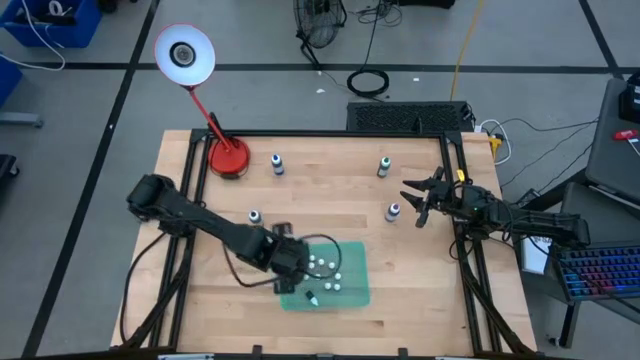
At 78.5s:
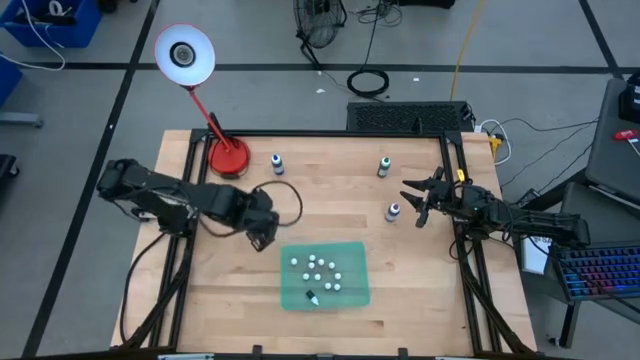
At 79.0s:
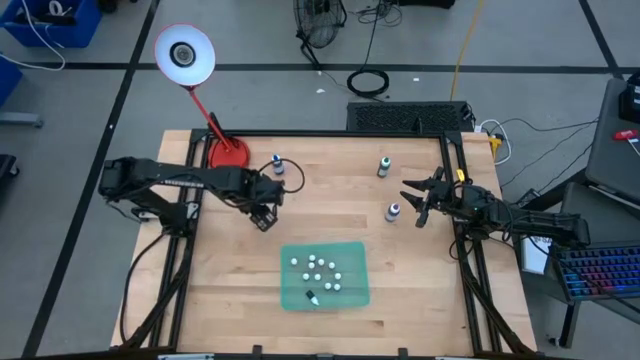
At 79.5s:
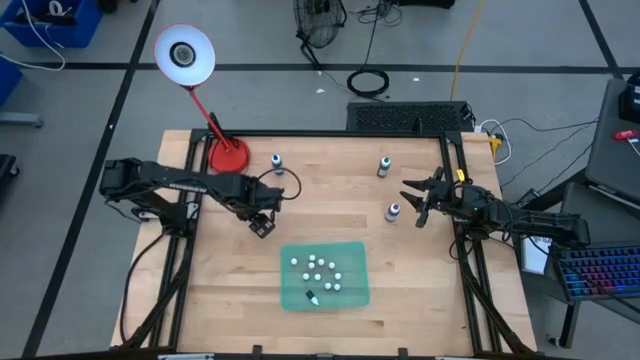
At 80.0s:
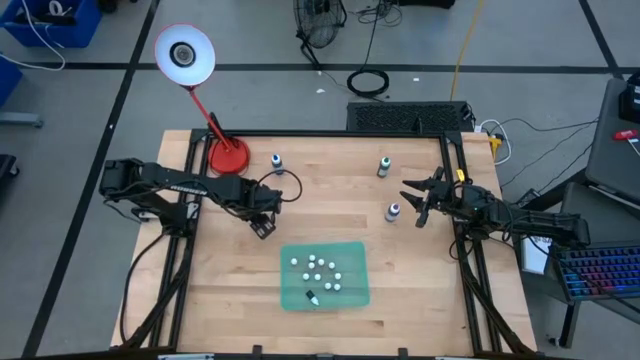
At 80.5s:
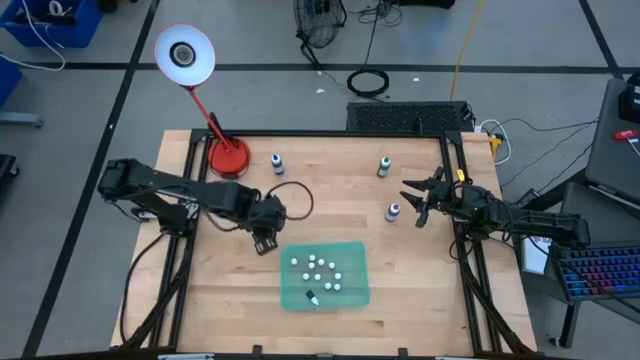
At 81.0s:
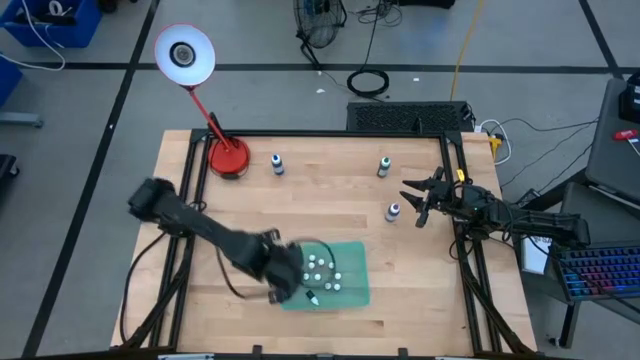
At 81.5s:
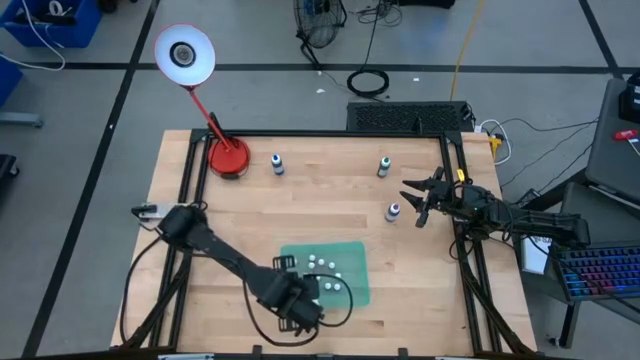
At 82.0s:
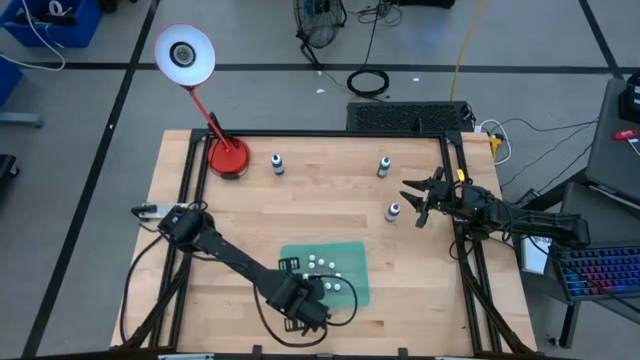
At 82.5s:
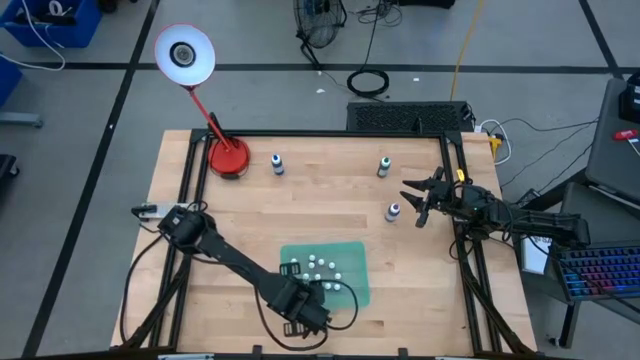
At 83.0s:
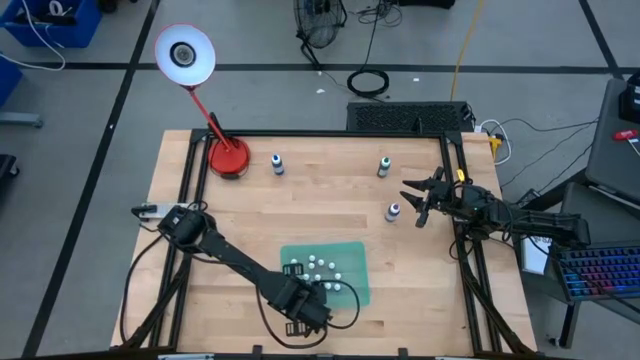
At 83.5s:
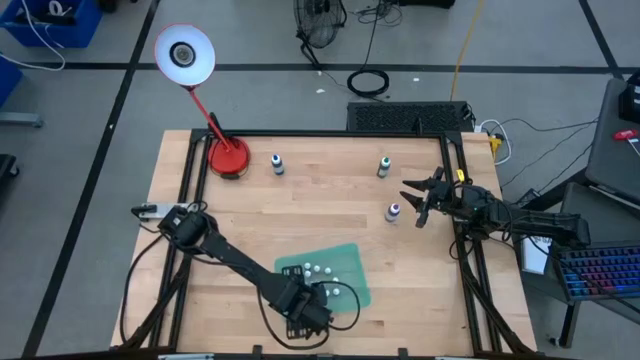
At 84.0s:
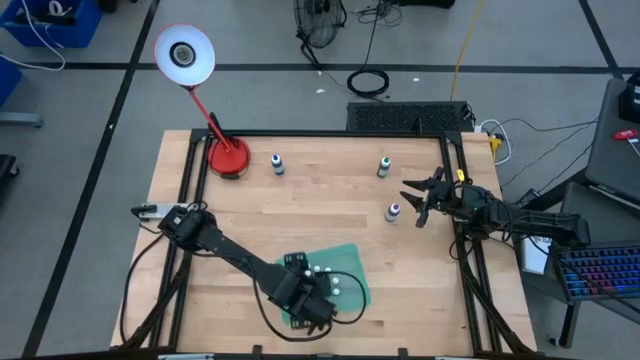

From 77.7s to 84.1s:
Task: Pick & Place food coloring
Put the large black food coloring bottle into the blue bin

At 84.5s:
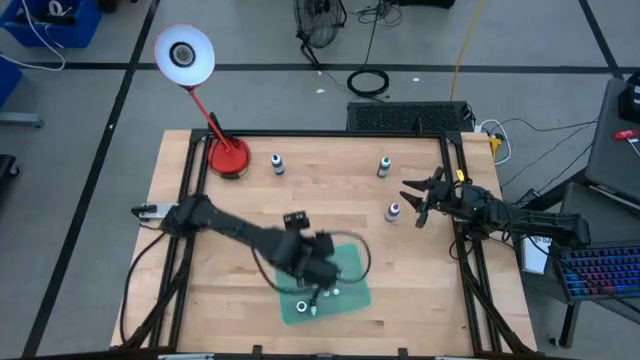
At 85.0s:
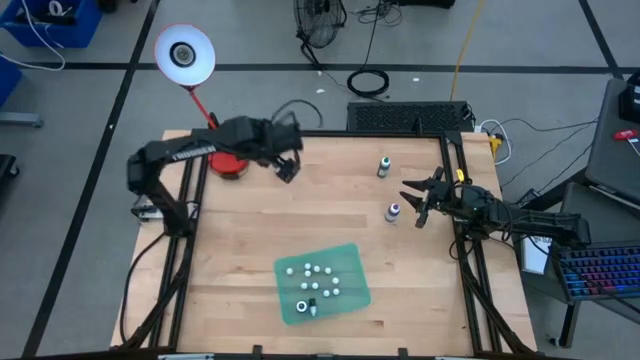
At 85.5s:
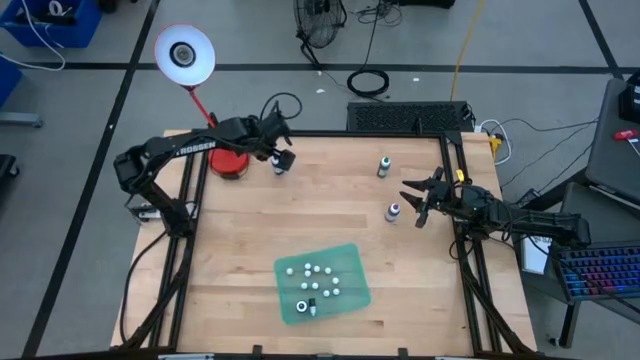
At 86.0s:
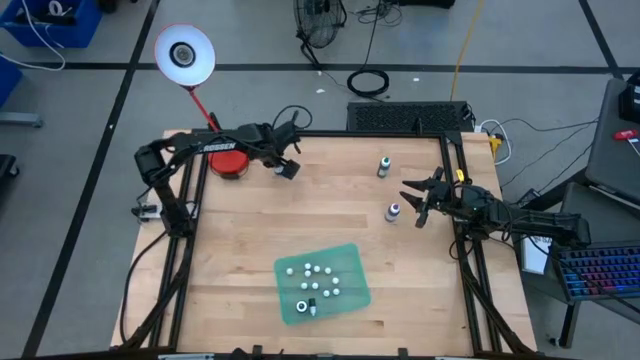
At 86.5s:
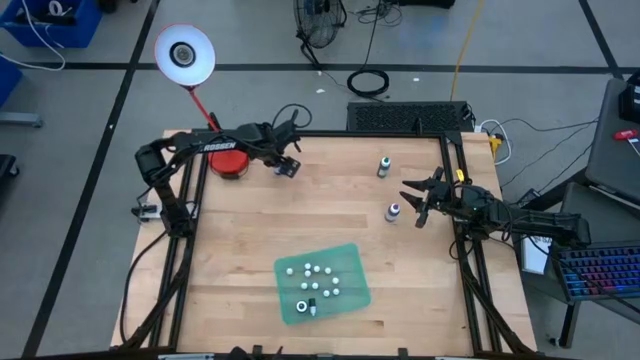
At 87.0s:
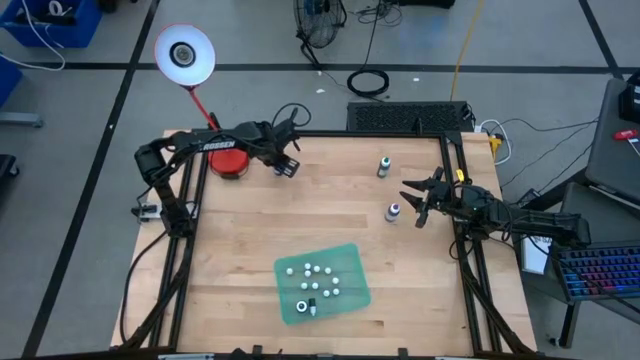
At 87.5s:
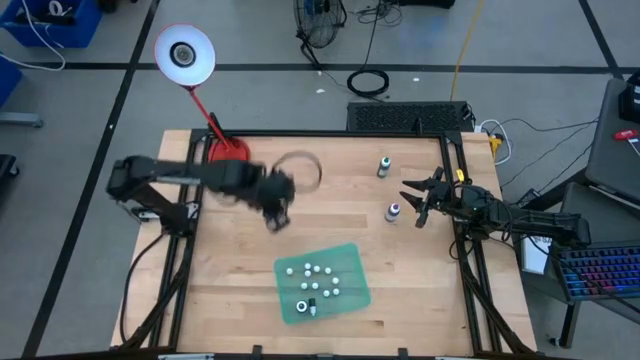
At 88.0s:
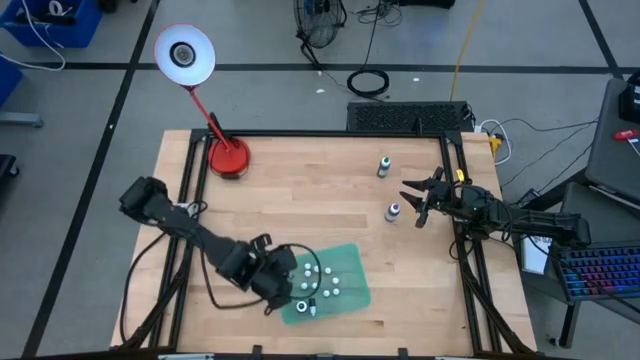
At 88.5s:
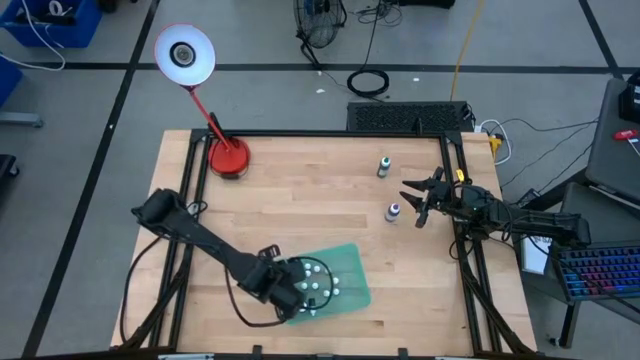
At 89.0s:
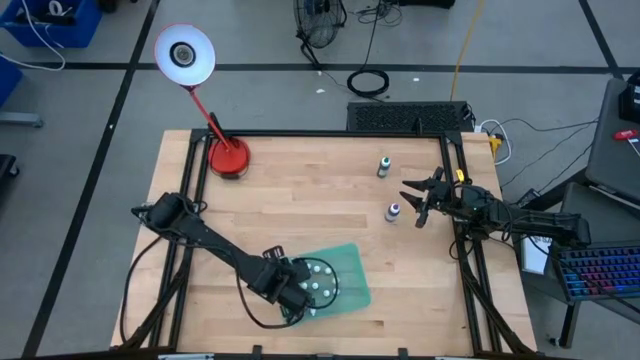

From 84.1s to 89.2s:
Put the large blue food coloring bottle into the blue bin

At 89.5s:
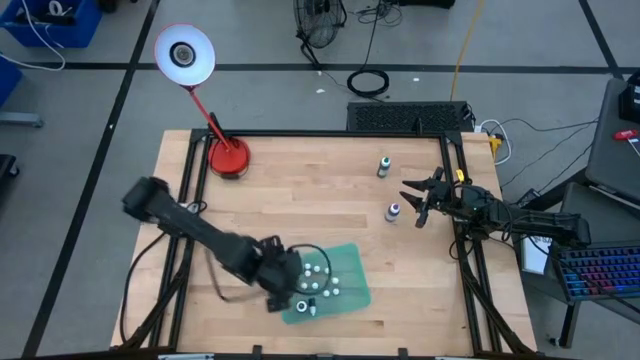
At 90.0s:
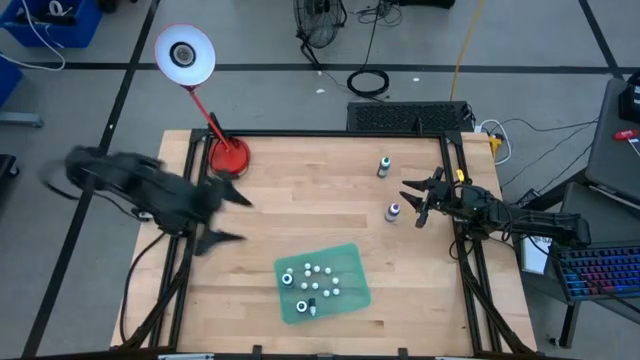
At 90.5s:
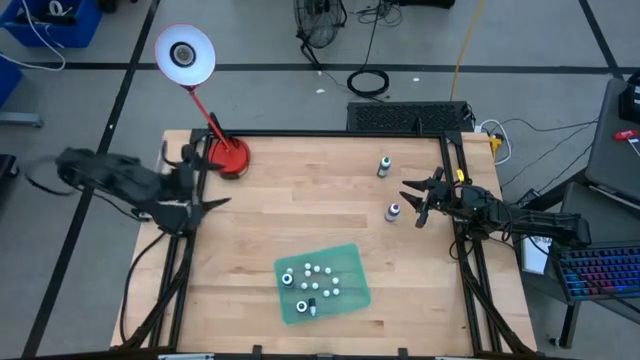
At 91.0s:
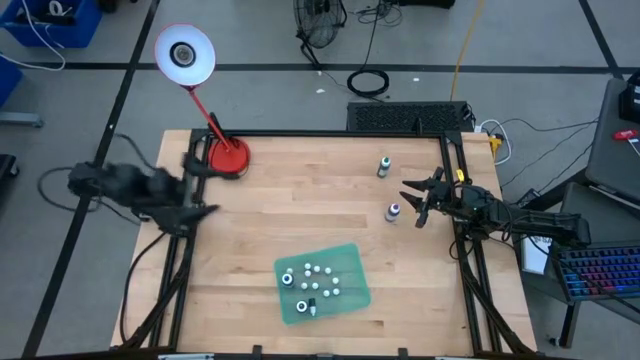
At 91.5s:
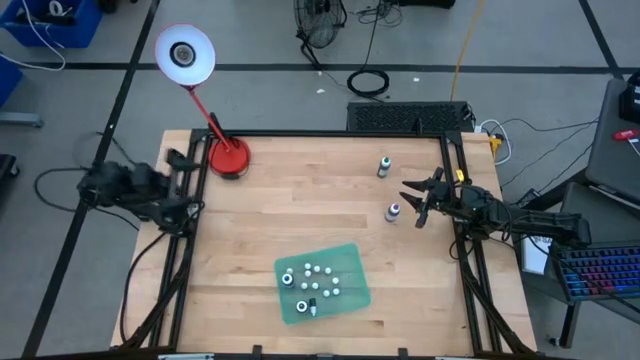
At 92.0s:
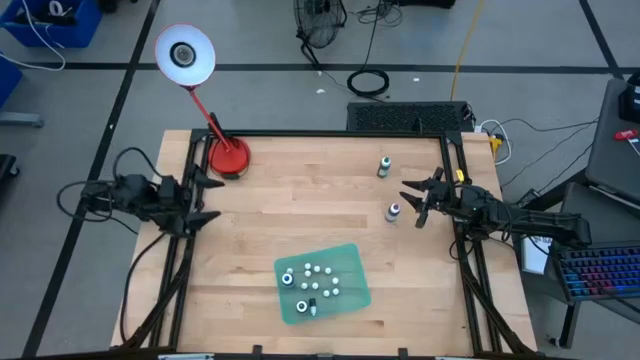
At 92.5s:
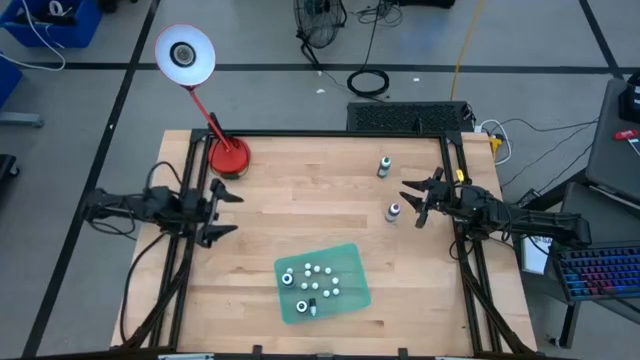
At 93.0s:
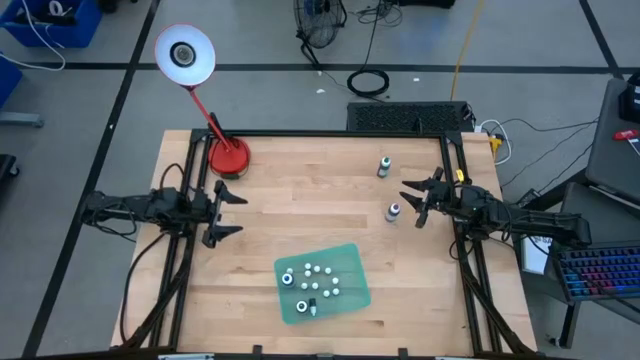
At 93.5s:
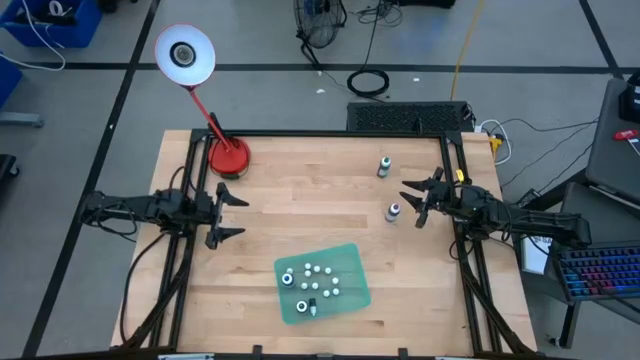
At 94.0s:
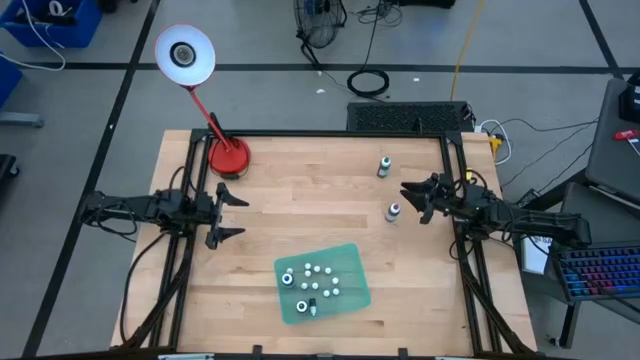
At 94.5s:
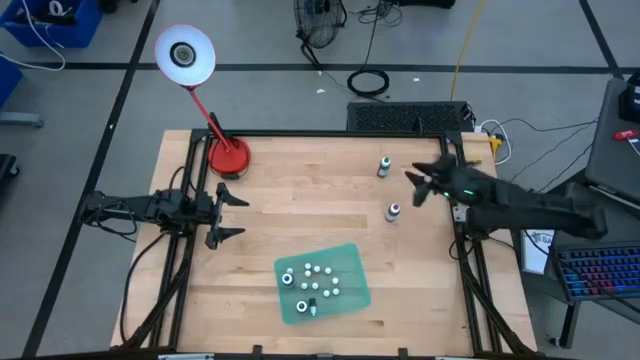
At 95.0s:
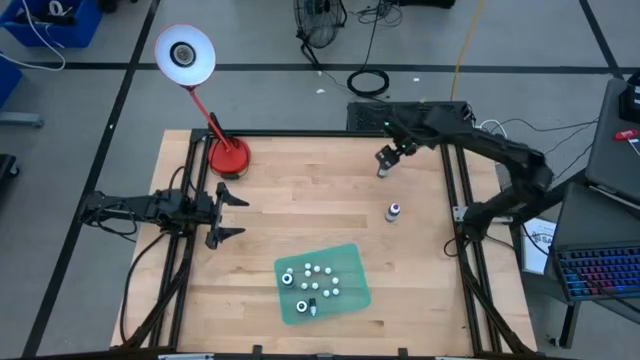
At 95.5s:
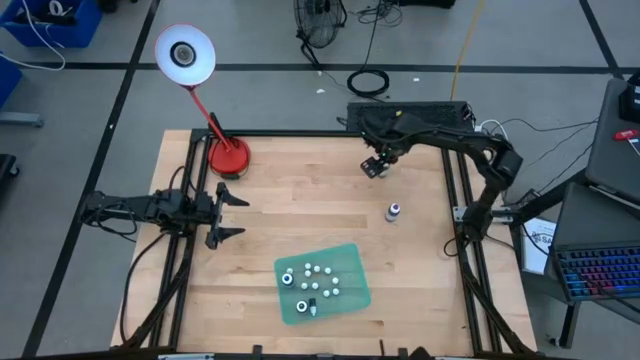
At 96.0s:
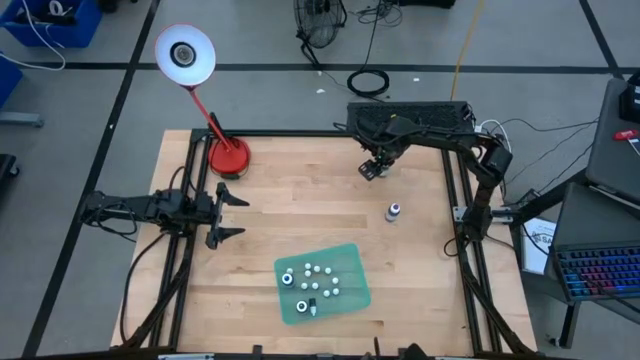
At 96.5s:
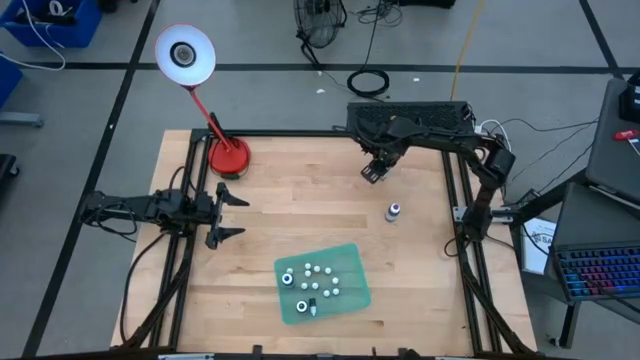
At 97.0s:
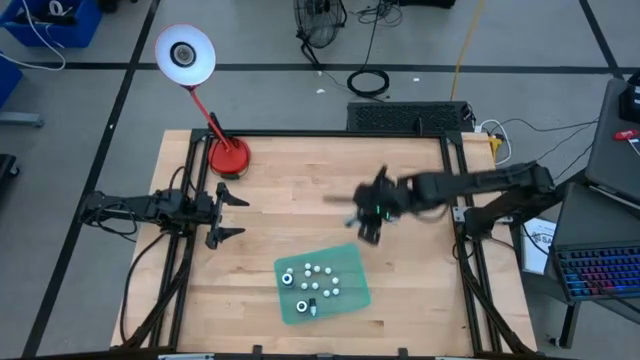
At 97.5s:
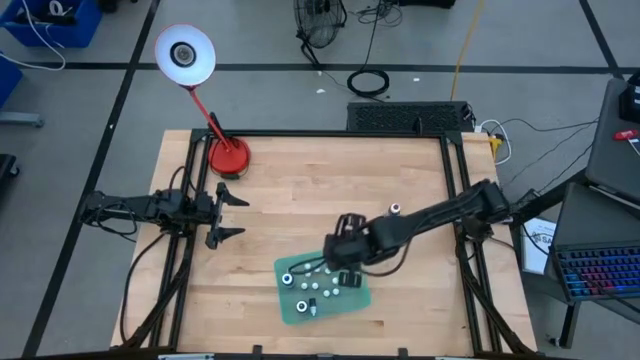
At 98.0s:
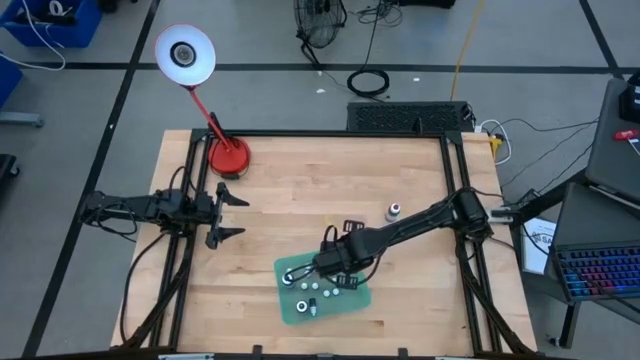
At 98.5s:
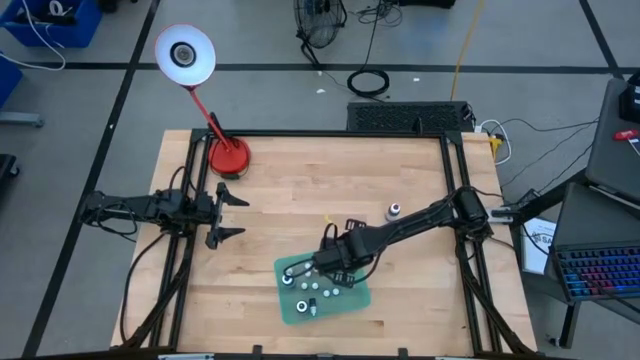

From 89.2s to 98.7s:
Put the large green food coloring bottle into the blue bin
